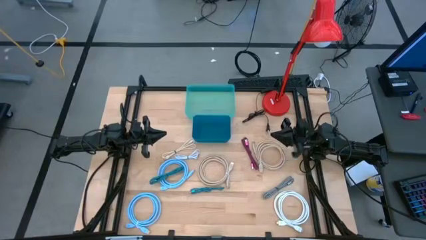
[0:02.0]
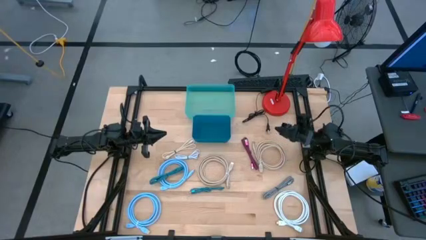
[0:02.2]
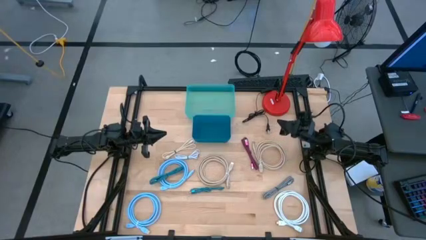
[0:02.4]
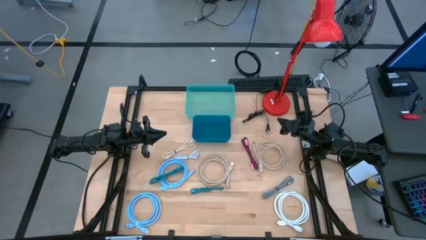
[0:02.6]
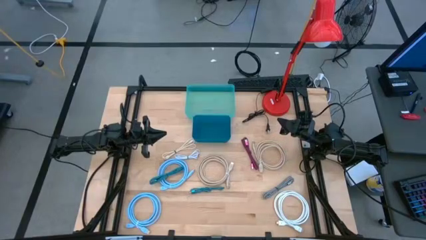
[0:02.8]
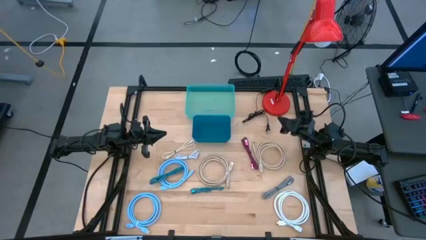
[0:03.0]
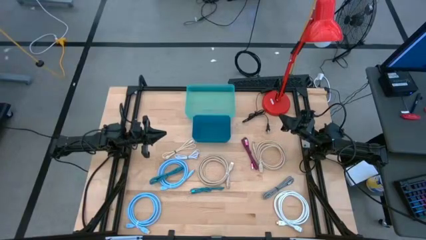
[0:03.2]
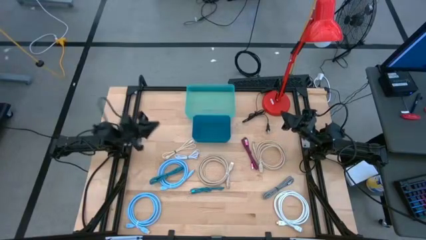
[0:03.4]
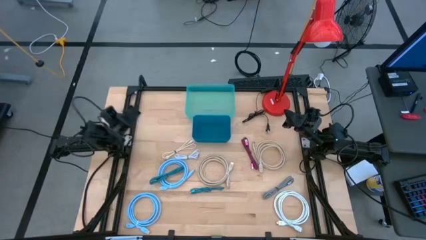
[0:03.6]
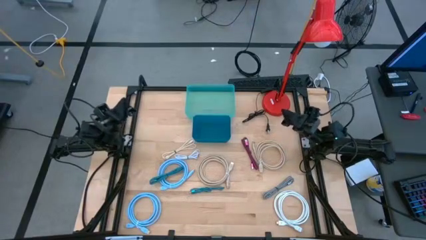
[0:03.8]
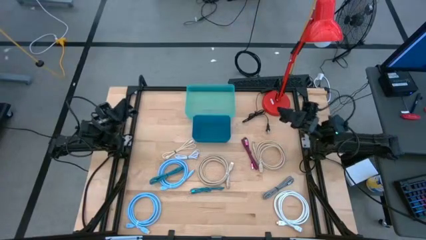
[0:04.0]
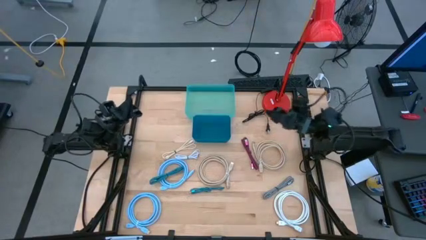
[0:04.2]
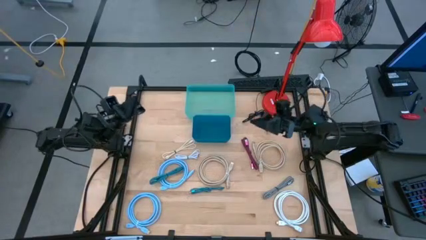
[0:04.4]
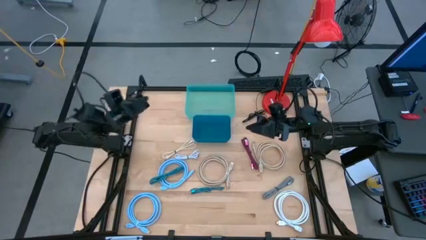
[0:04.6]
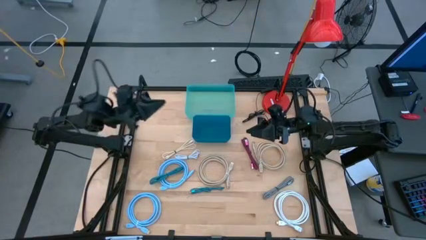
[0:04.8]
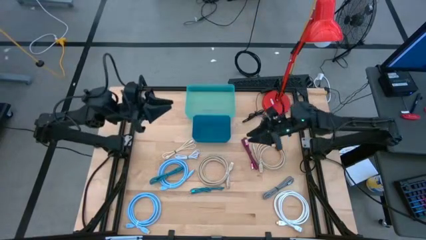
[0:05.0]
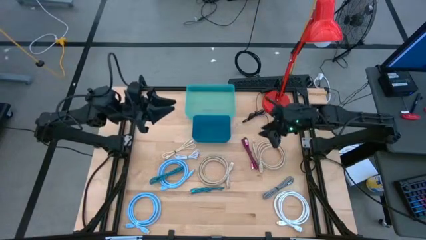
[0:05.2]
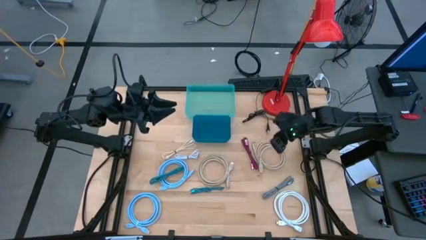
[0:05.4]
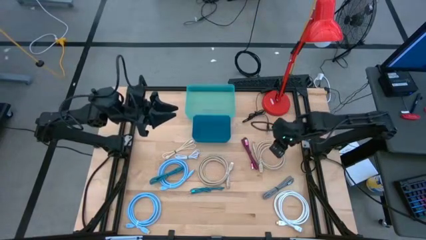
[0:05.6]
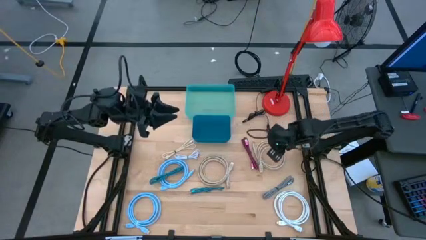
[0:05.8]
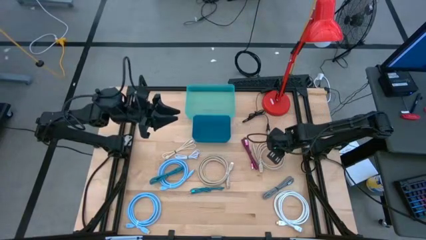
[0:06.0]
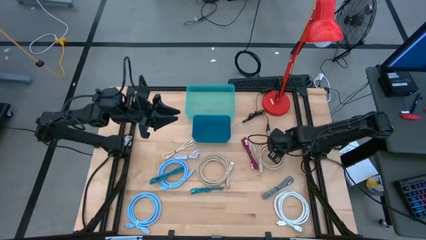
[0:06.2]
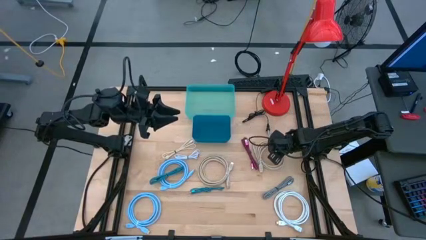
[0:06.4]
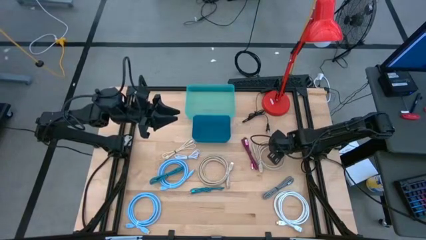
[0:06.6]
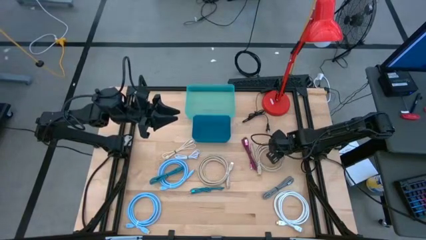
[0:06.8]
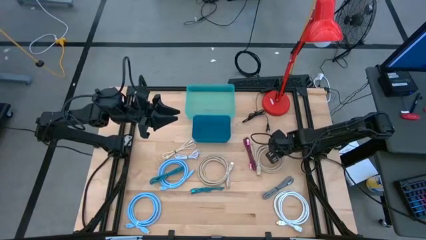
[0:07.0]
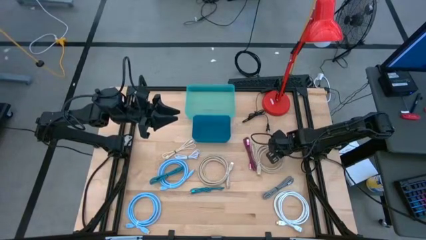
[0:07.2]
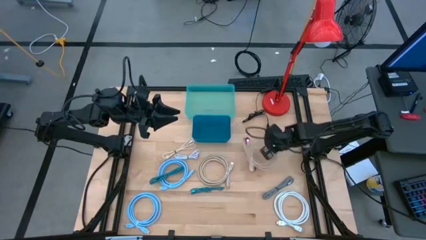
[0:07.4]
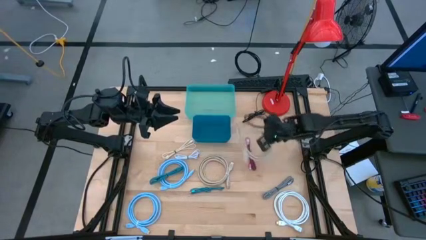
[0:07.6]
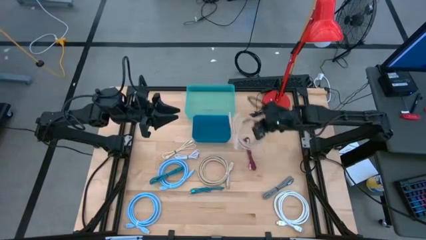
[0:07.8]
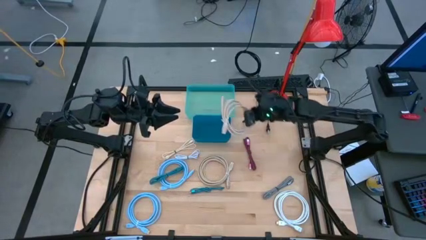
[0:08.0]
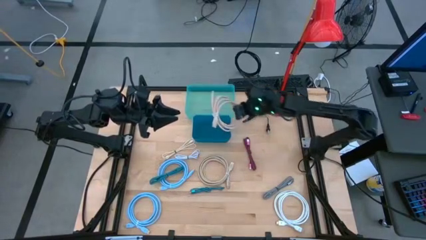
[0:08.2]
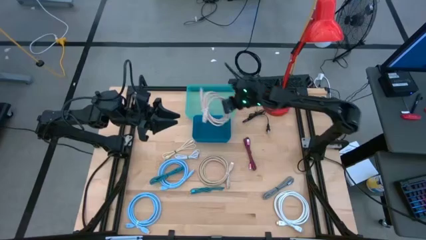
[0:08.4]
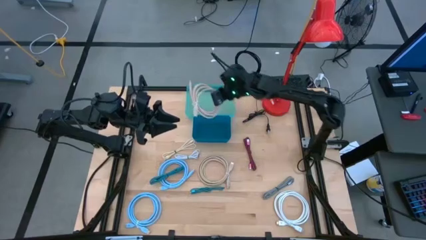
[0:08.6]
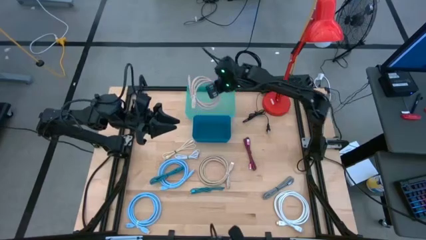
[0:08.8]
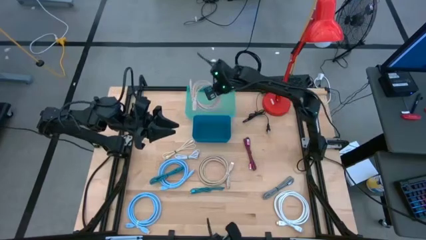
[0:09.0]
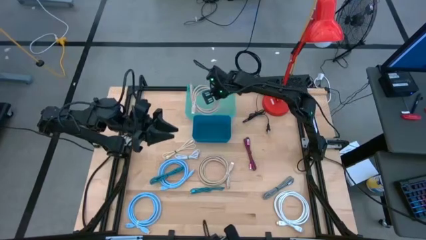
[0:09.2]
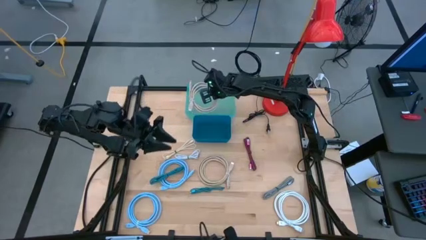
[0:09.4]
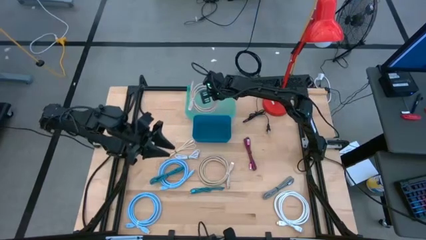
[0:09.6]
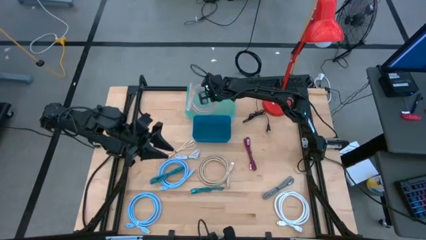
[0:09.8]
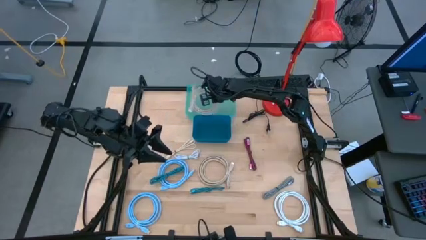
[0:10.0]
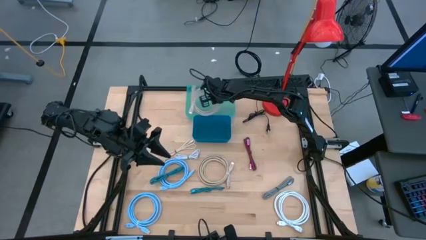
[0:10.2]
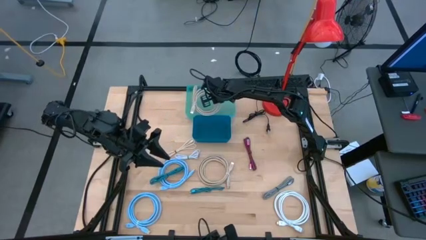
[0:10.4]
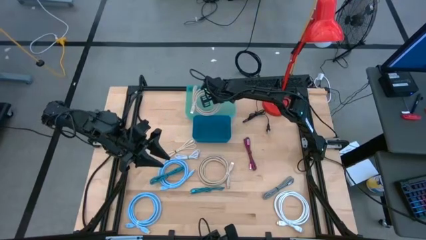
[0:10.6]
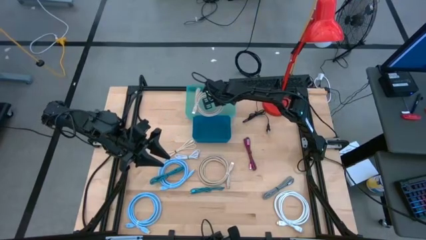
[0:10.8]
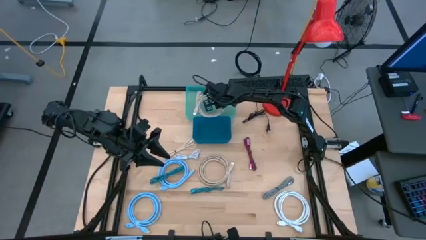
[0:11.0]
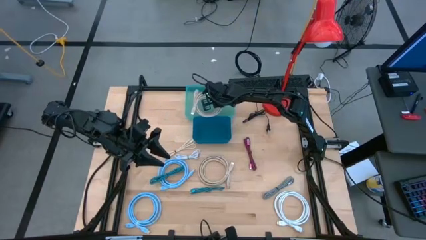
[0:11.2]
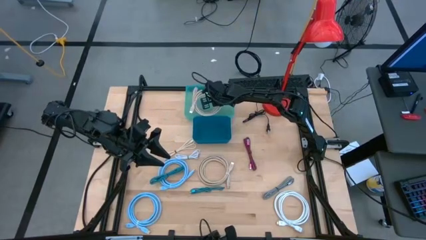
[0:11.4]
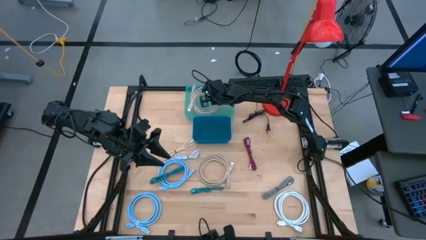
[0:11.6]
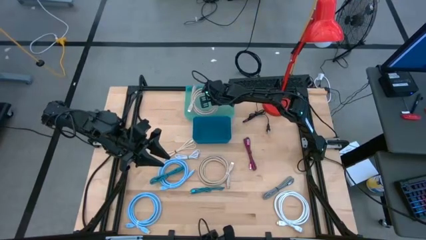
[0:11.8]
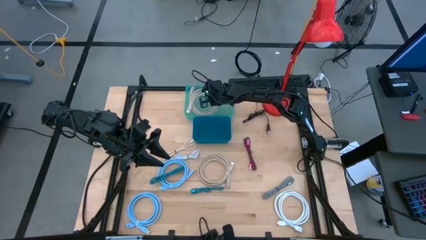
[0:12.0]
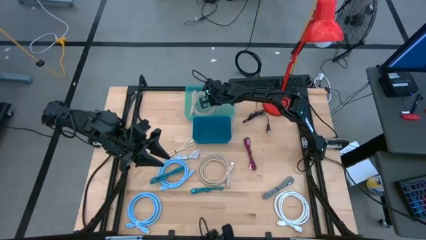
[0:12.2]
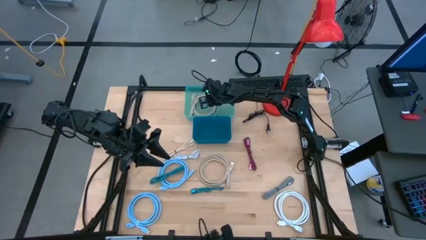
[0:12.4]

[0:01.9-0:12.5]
Task: Pick & Place USB Port
Put the brown display cable into the green bin

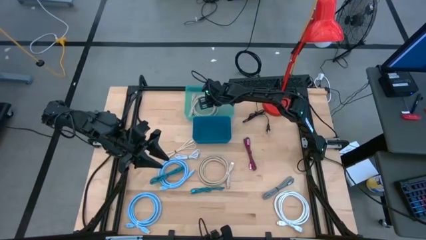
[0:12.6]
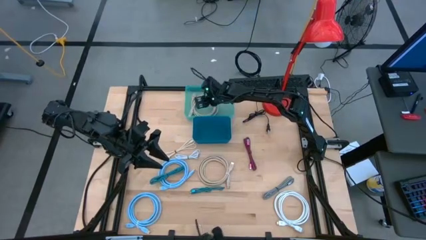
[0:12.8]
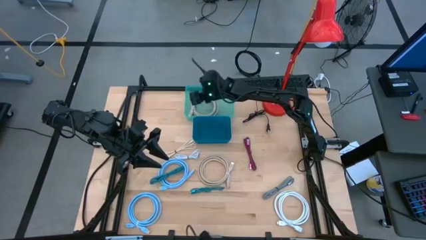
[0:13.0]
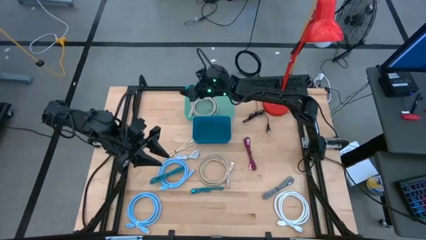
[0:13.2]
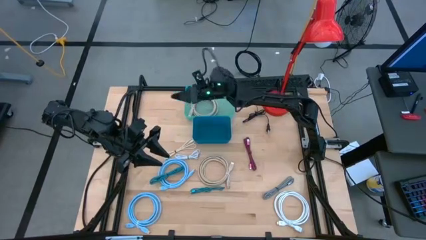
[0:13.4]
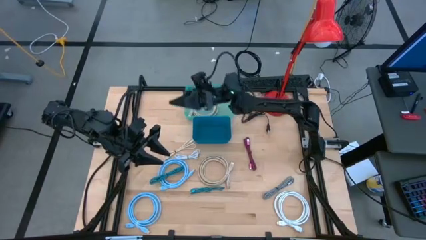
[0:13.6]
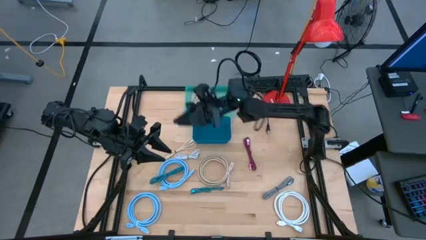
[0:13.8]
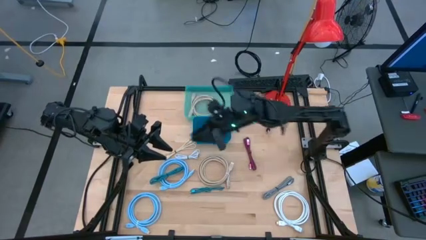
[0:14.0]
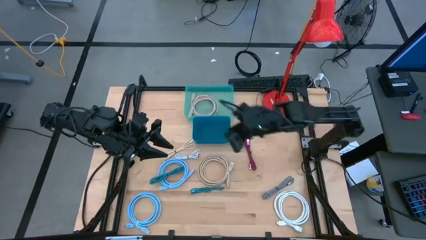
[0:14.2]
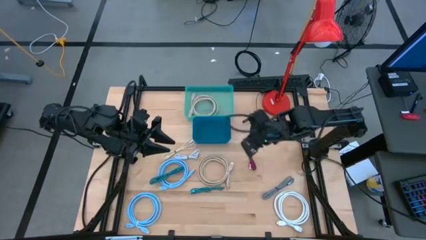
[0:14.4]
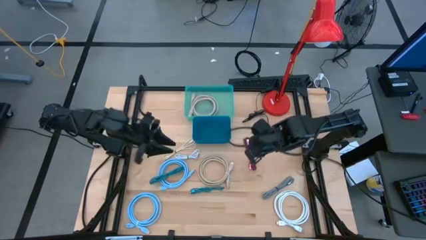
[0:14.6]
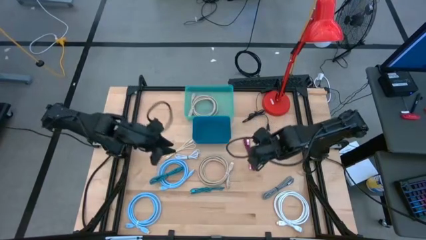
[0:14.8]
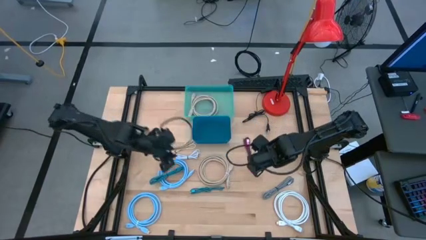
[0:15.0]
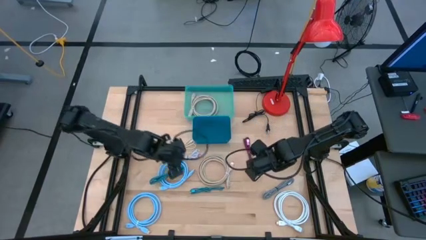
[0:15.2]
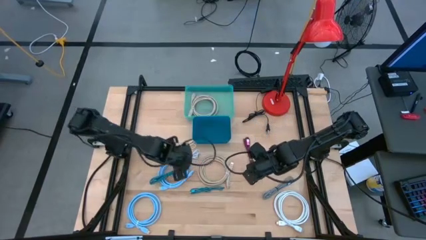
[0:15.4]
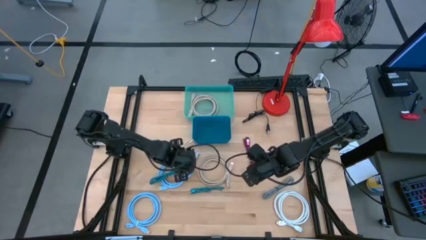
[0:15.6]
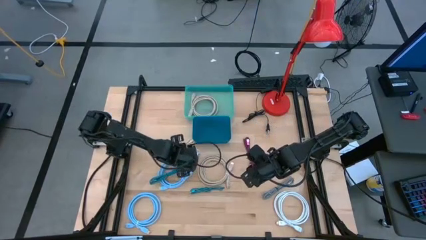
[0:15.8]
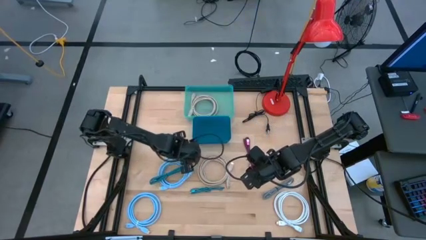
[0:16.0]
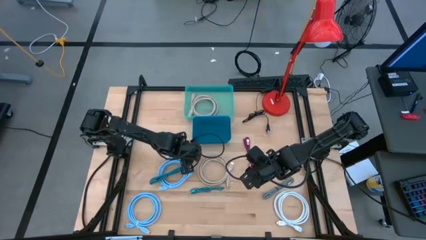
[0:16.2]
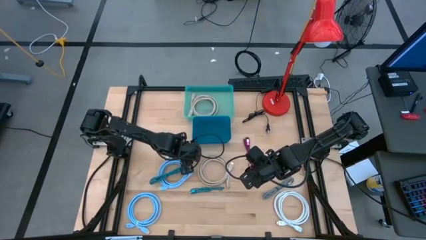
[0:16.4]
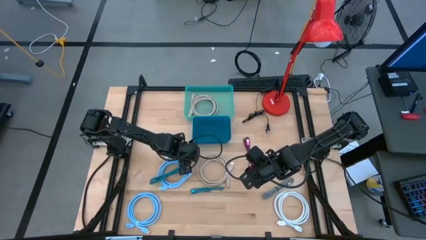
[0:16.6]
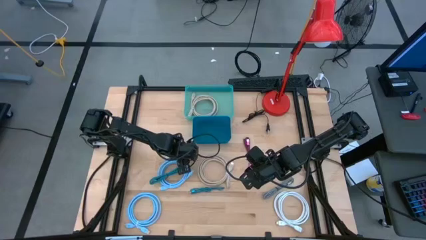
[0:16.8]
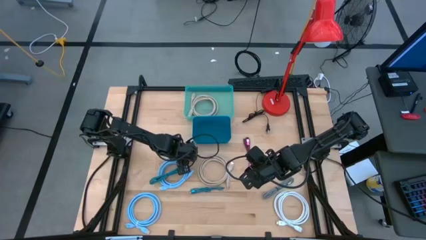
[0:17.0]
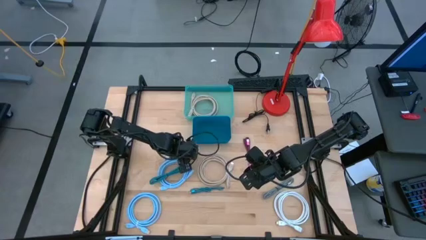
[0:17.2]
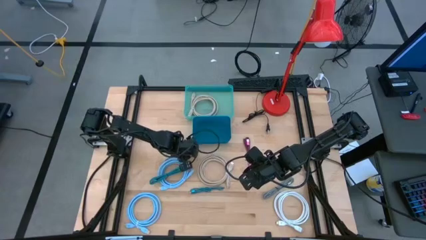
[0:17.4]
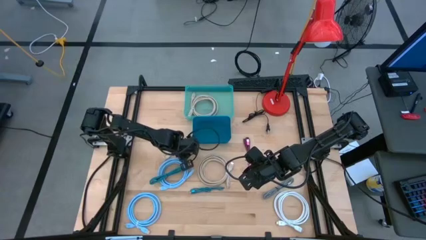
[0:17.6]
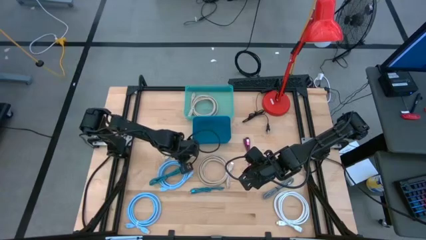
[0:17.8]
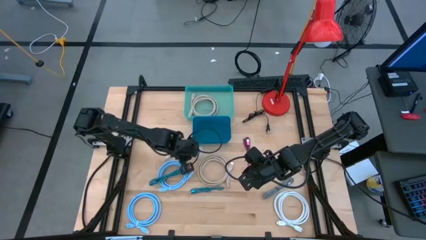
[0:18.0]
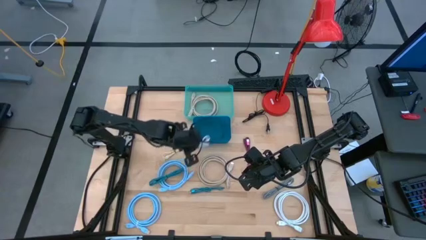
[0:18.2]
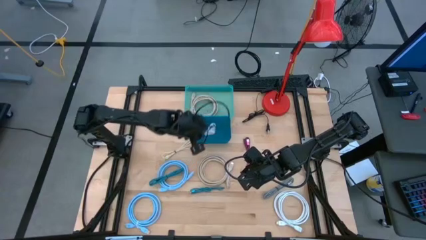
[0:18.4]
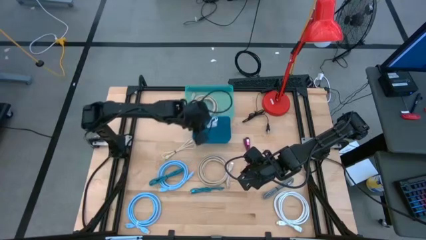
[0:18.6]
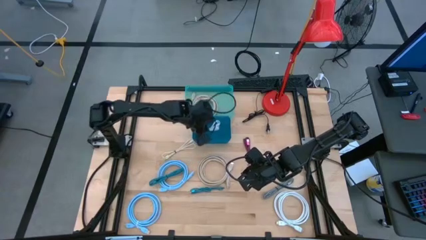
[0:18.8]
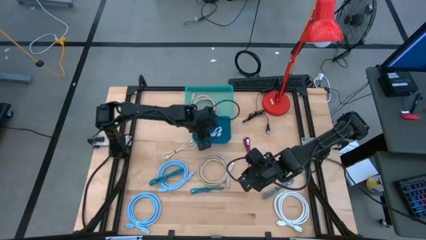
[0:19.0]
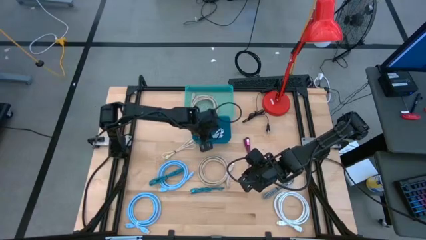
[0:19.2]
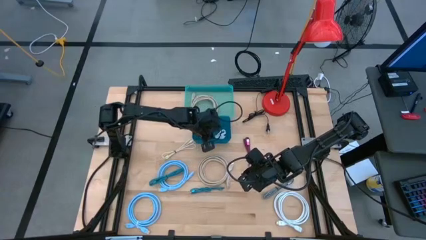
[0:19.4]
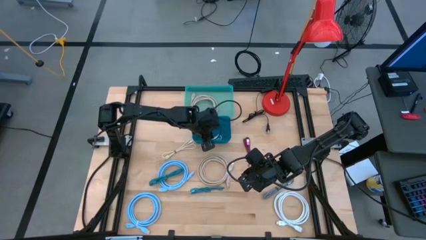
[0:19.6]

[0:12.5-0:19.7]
Put the white charger cable into the blue bin
